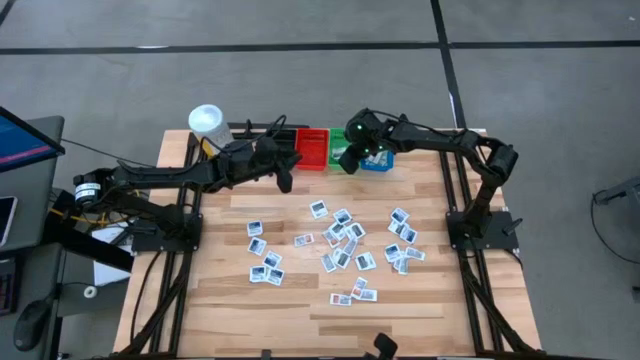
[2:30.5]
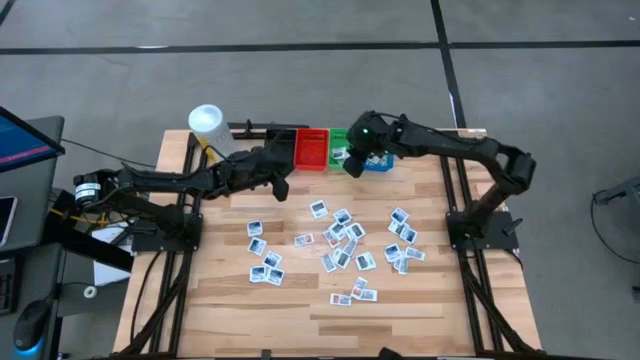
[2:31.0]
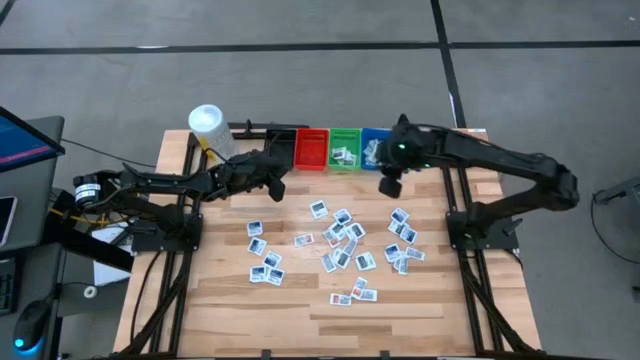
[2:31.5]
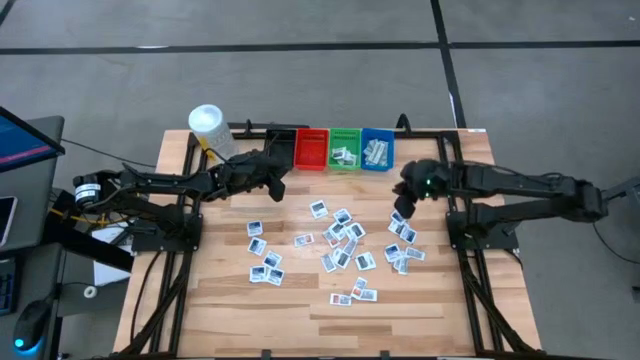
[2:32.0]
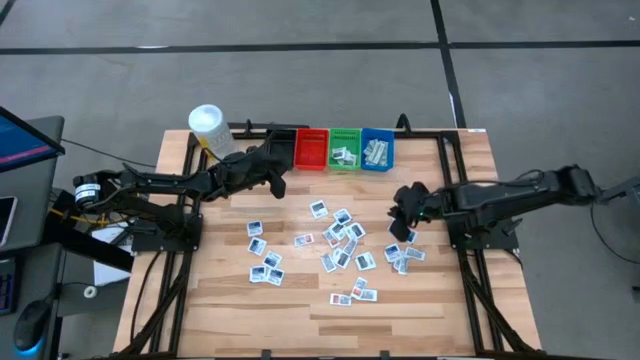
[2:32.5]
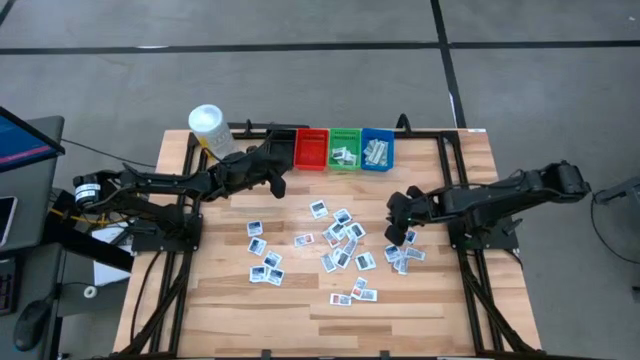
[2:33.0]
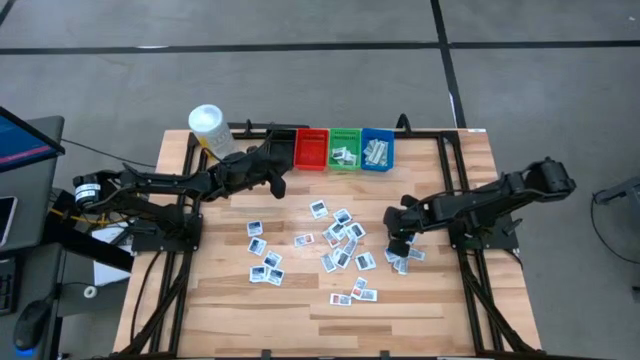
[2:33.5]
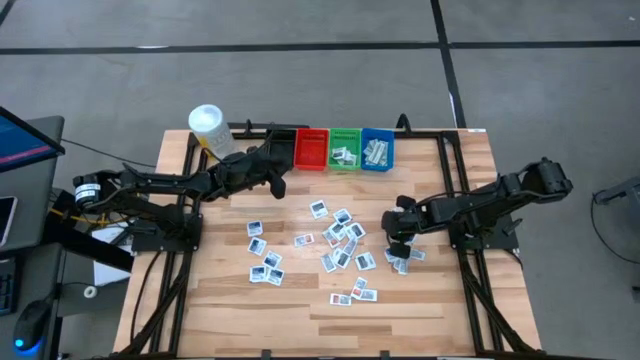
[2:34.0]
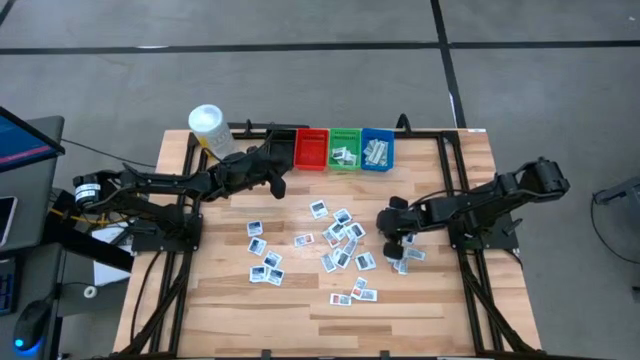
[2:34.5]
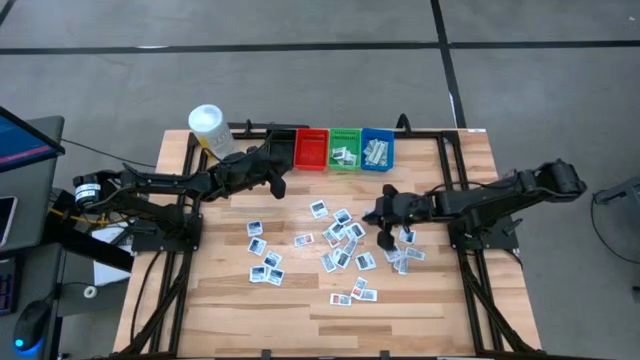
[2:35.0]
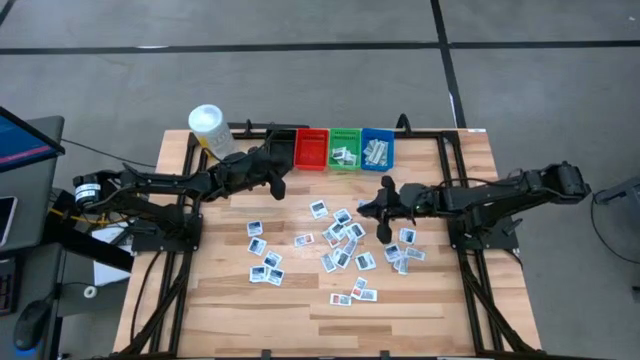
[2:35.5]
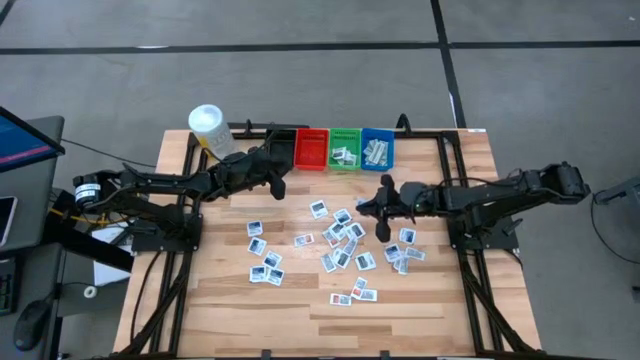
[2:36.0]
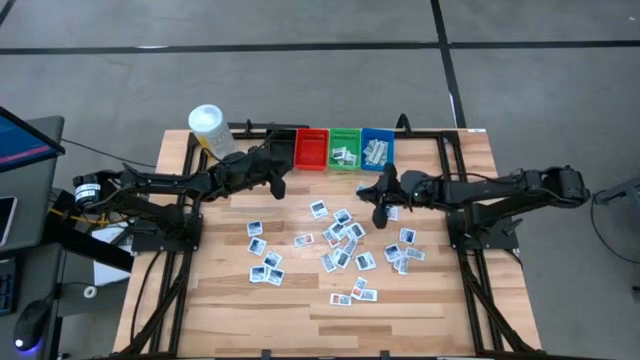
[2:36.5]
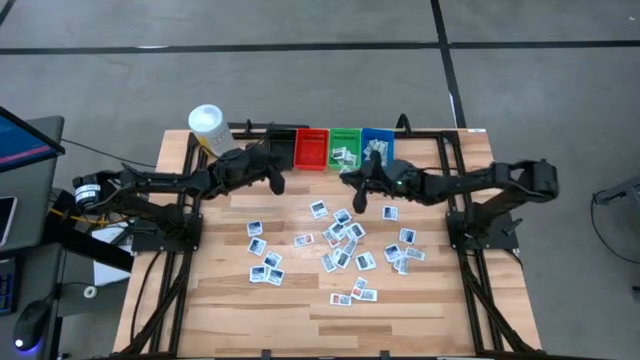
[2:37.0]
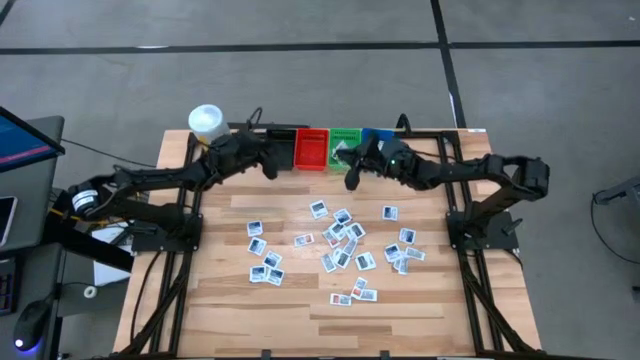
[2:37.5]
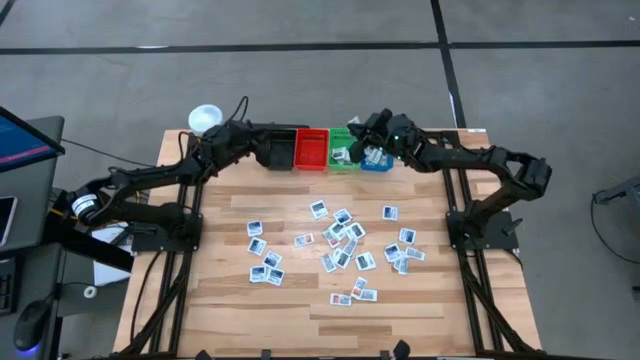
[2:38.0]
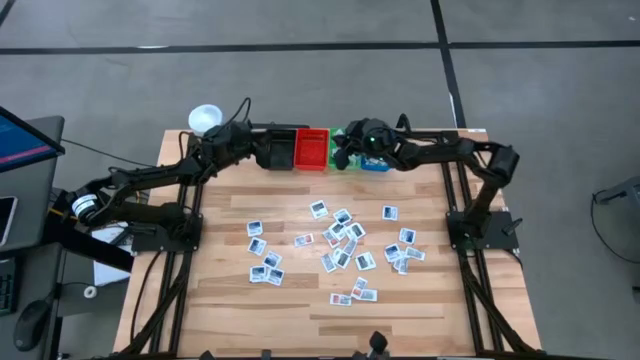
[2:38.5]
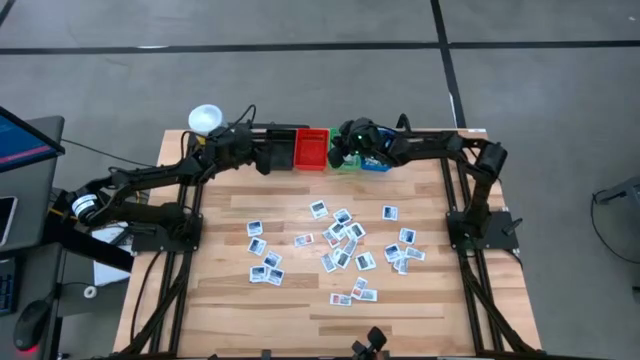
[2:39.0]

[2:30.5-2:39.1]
Task: Pick & Place First Aid Supplies
Put the towelette pack into the green bin

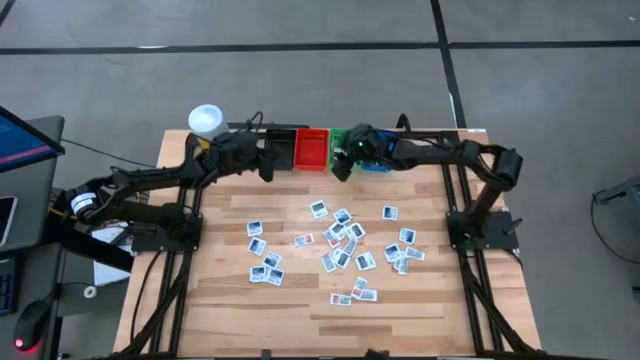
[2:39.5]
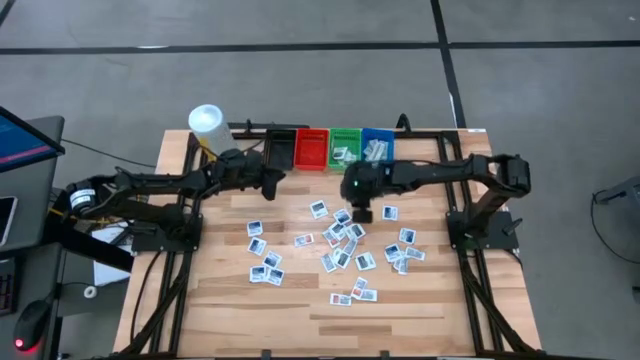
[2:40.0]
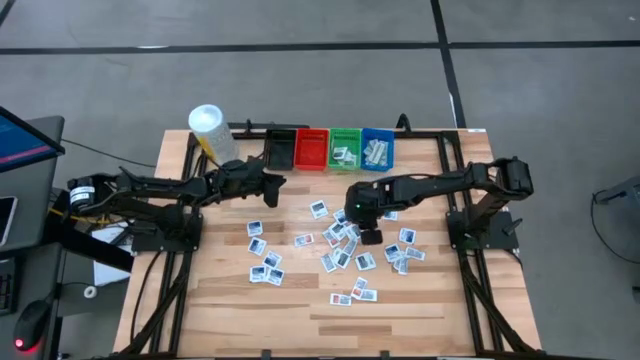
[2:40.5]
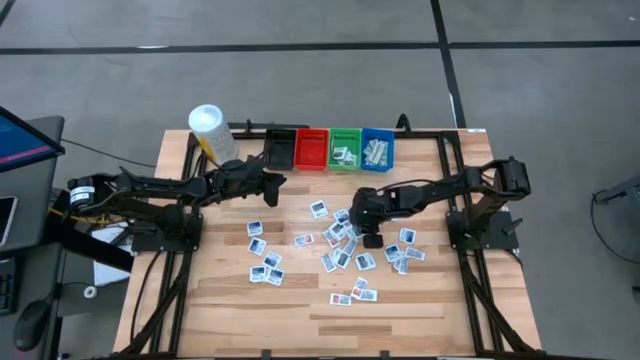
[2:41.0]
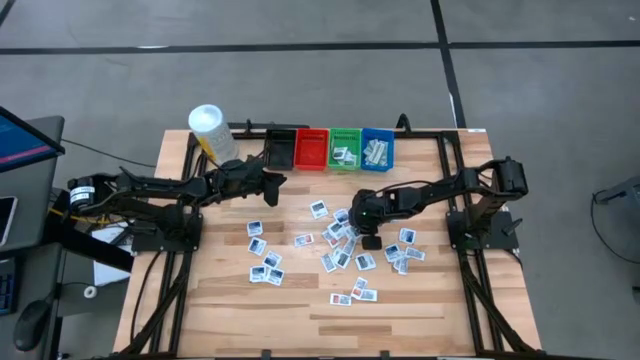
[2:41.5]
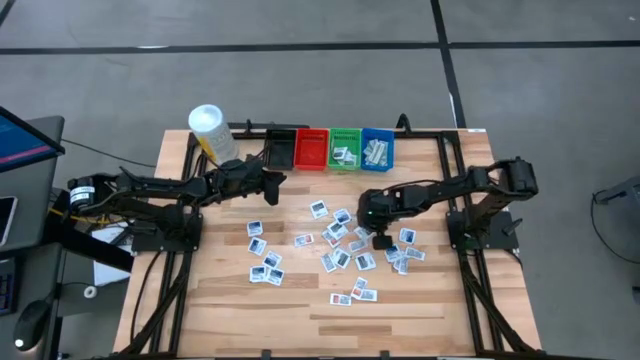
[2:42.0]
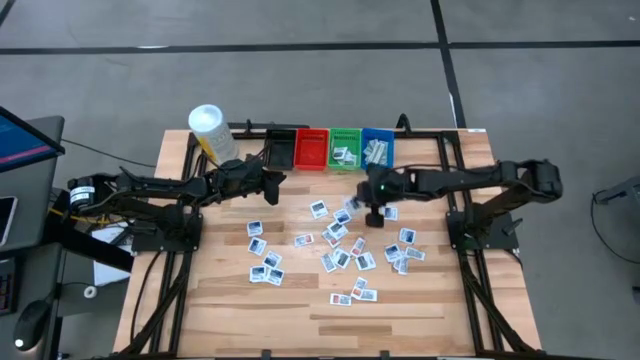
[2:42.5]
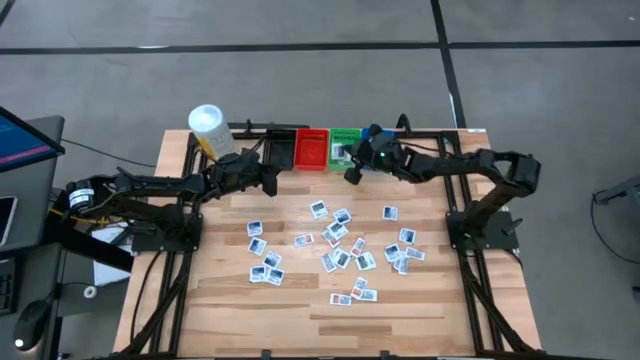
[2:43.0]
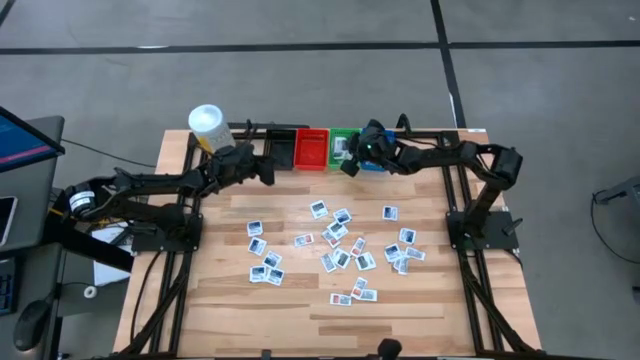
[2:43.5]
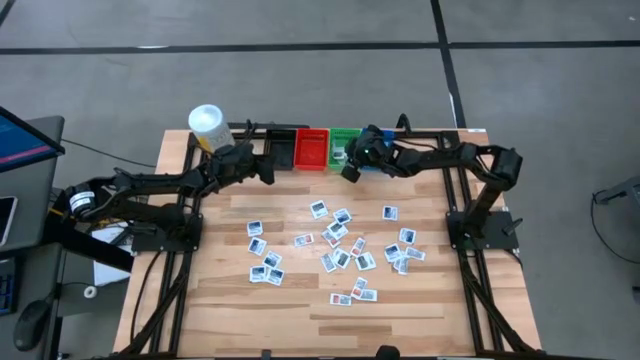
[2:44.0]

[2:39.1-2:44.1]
Put the towelette pack into the green bin

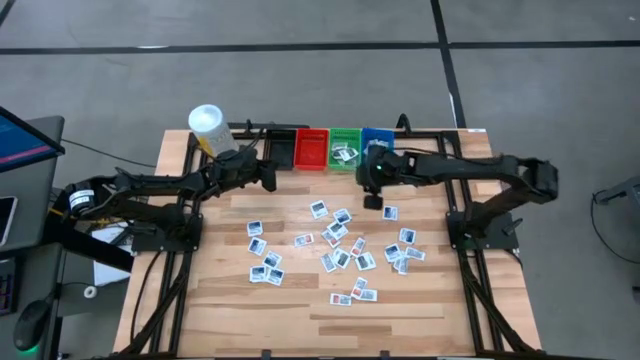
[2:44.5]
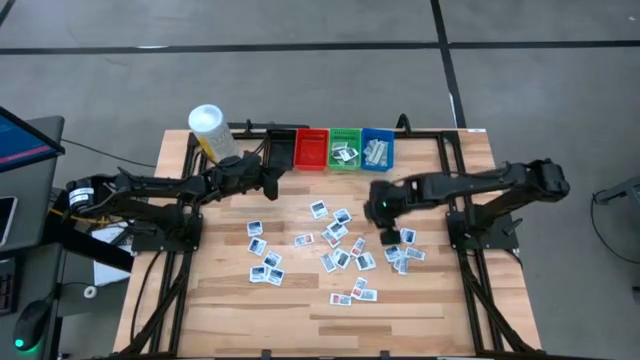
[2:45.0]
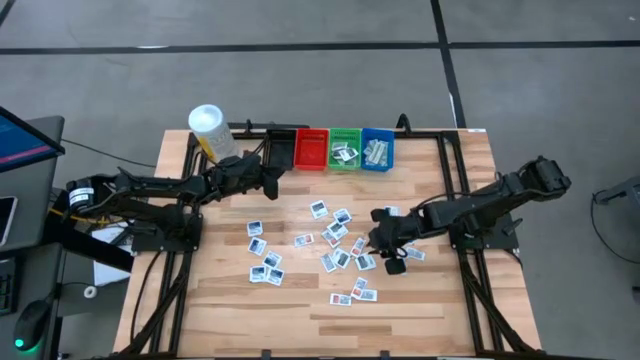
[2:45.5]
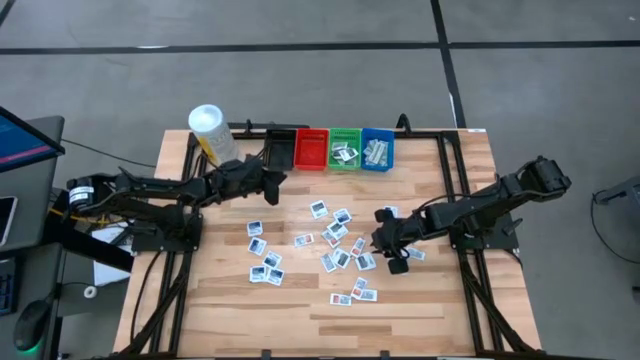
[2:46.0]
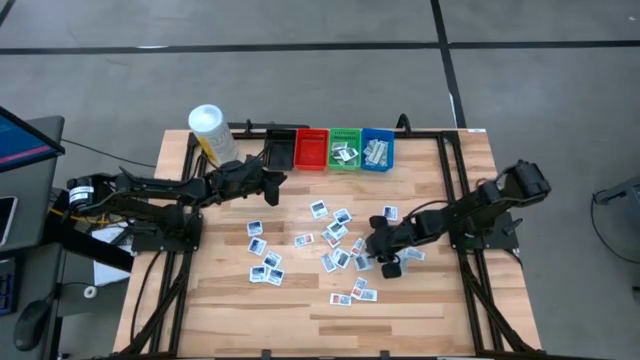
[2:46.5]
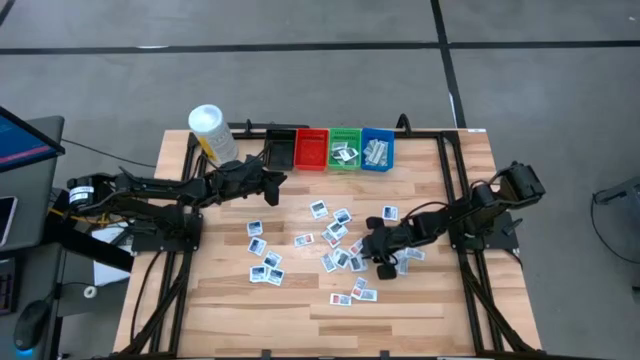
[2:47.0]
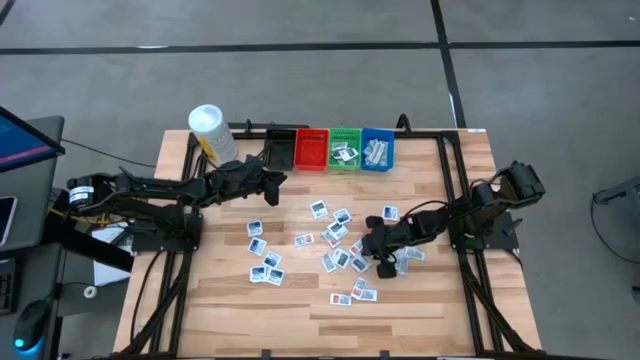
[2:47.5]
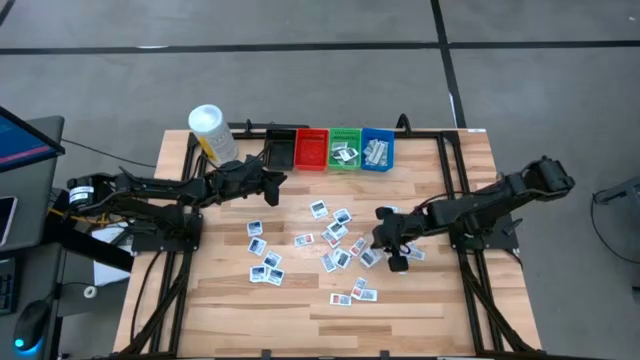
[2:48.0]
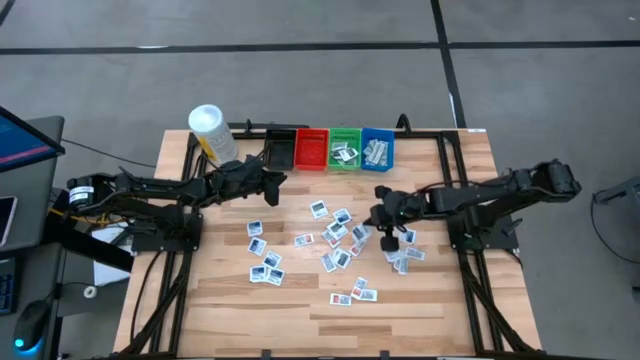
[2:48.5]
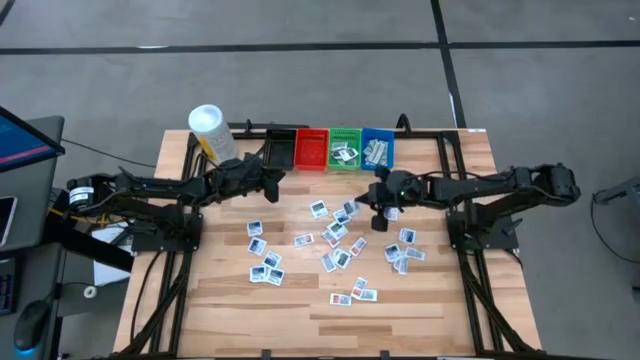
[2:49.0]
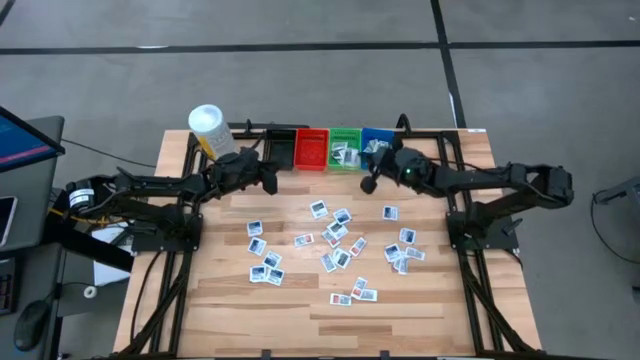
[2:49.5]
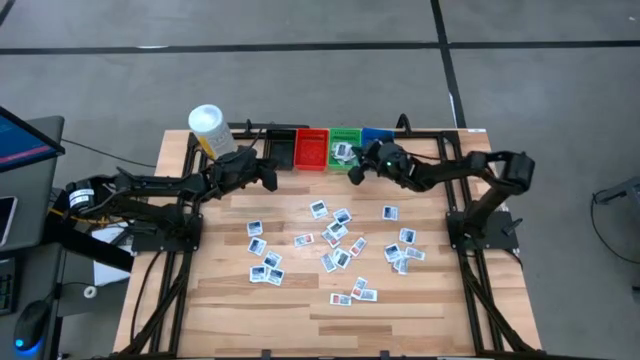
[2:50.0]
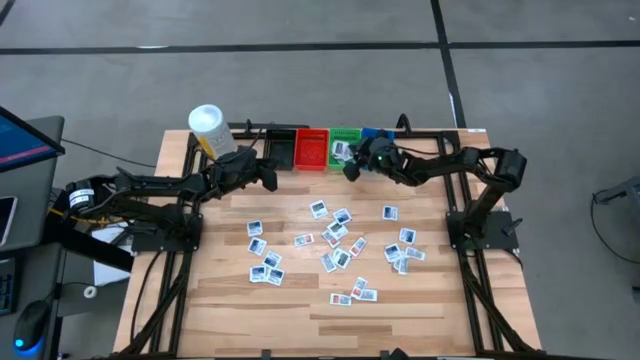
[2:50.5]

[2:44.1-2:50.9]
Put the towelette pack into the green bin

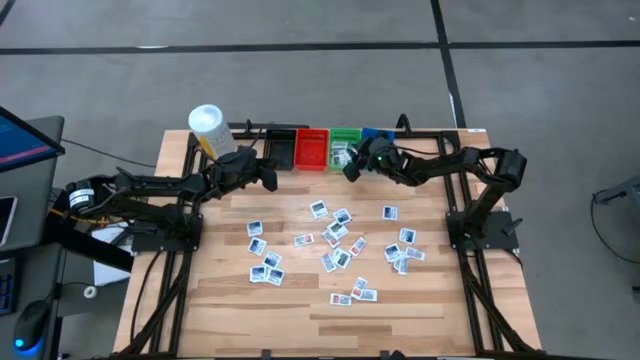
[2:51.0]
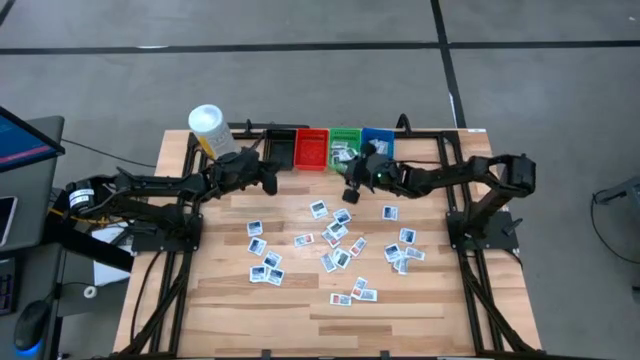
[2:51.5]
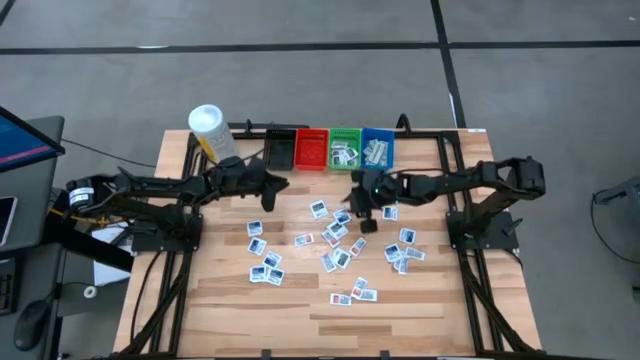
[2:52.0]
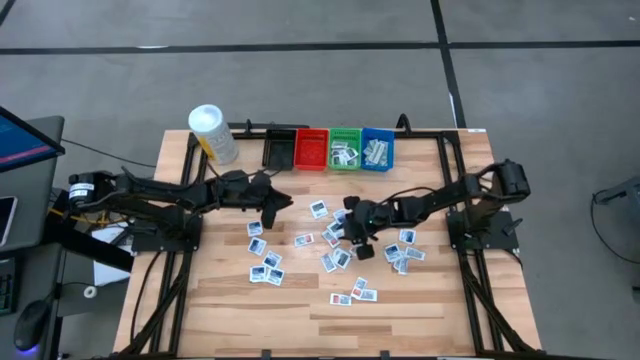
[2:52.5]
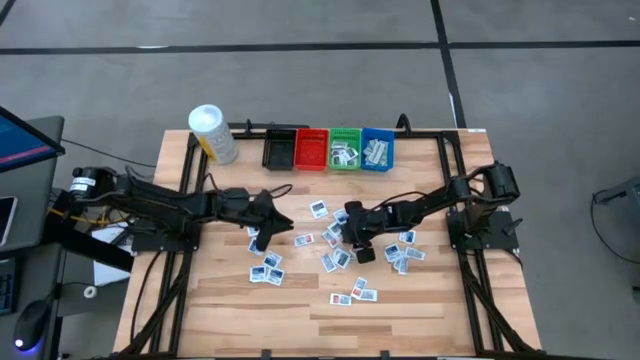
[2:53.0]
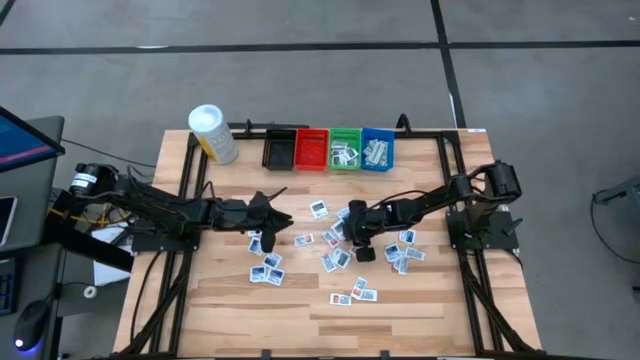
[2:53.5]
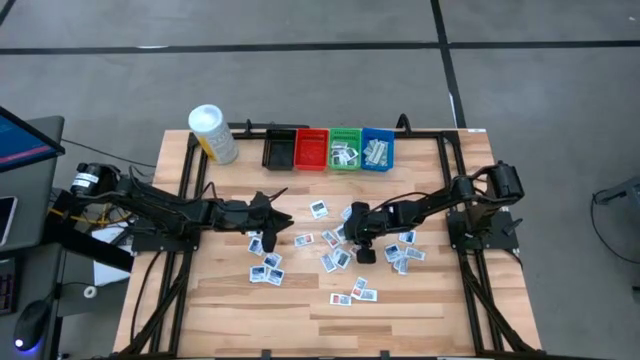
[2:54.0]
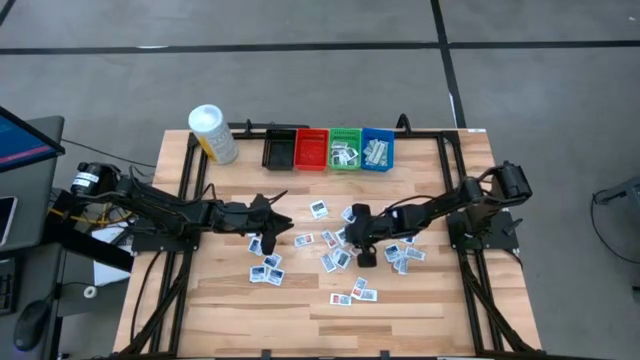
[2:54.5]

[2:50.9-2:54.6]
Put the middle towelette pack into the green bin
